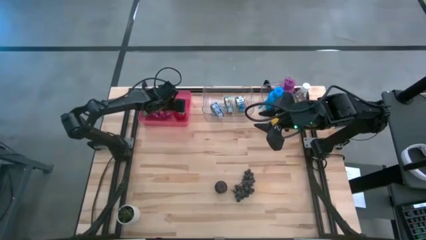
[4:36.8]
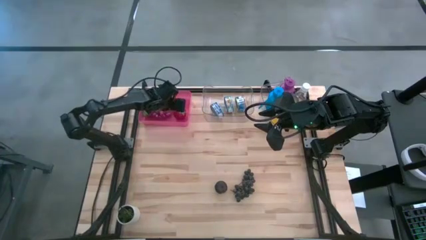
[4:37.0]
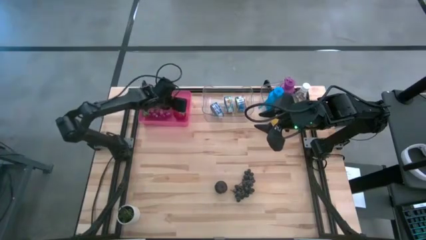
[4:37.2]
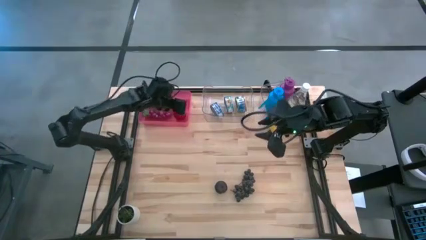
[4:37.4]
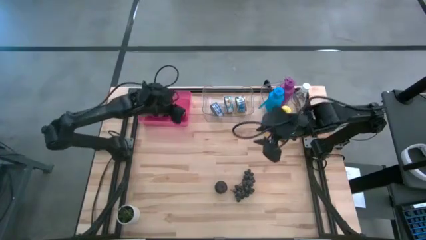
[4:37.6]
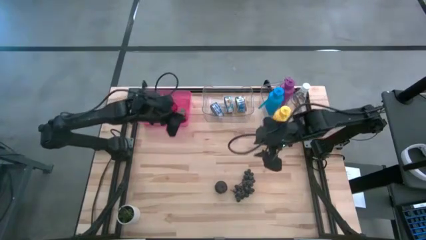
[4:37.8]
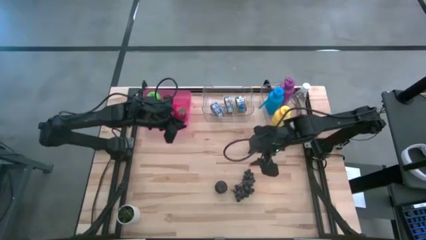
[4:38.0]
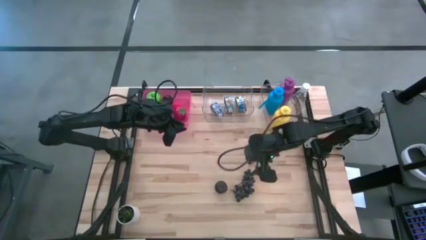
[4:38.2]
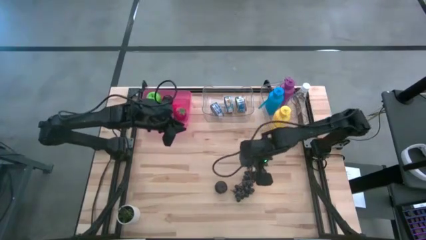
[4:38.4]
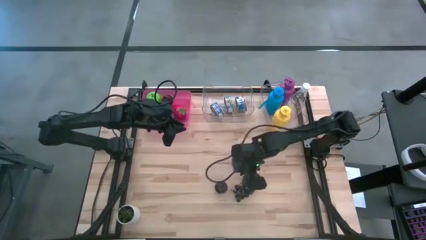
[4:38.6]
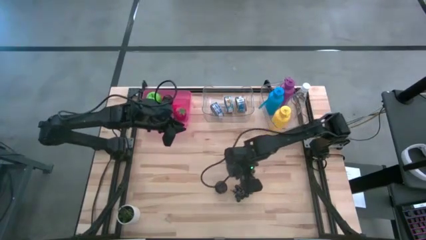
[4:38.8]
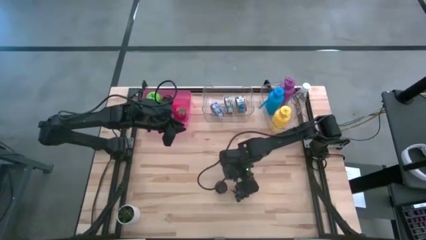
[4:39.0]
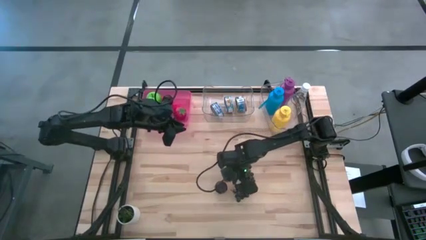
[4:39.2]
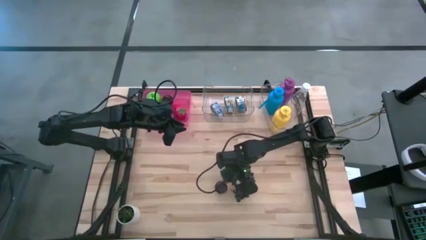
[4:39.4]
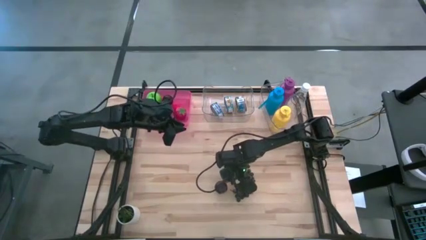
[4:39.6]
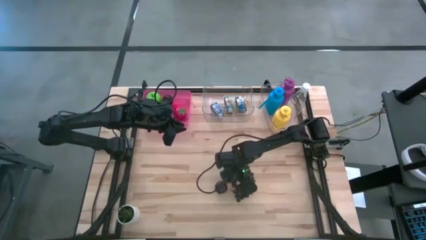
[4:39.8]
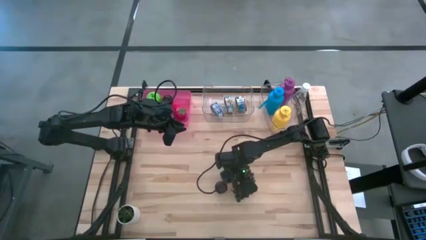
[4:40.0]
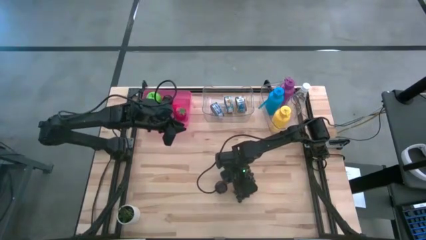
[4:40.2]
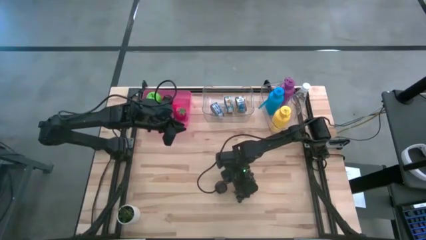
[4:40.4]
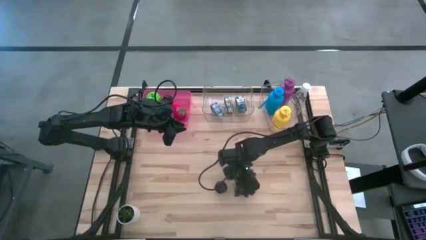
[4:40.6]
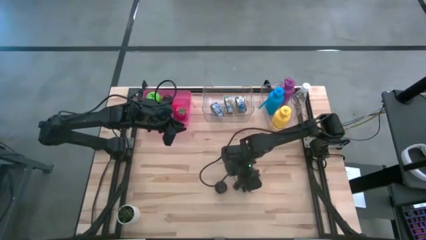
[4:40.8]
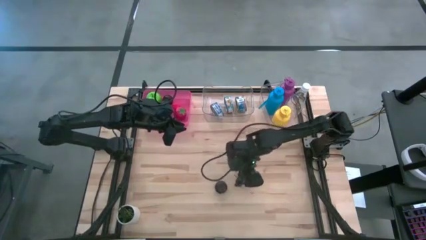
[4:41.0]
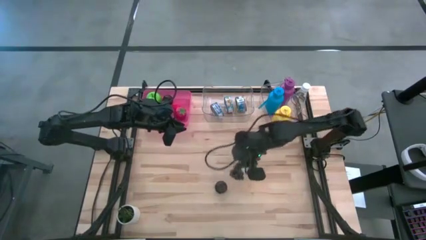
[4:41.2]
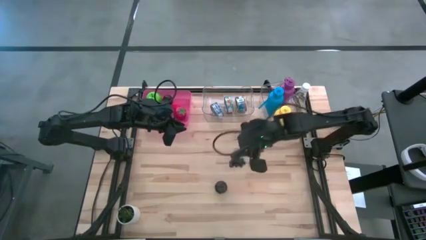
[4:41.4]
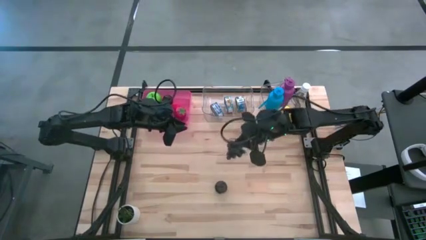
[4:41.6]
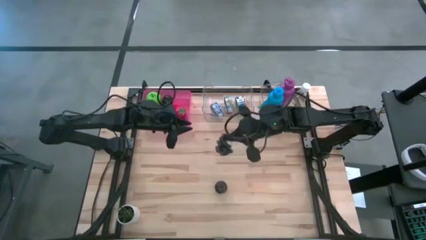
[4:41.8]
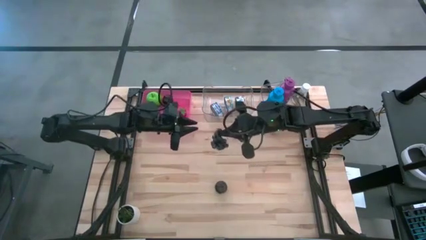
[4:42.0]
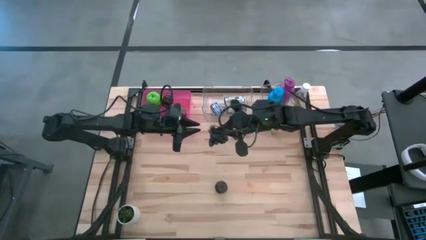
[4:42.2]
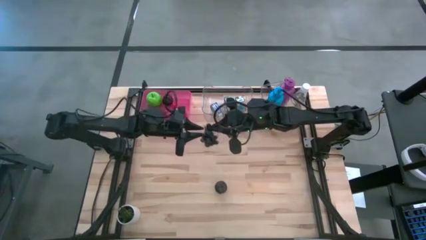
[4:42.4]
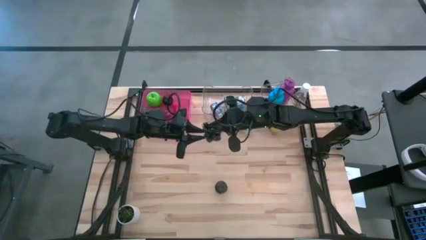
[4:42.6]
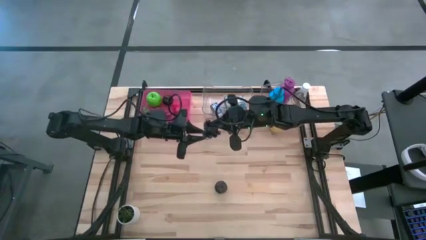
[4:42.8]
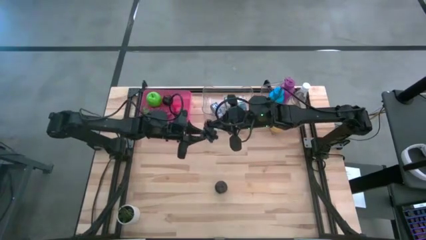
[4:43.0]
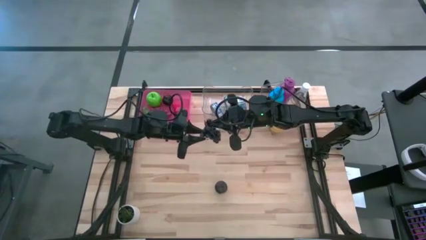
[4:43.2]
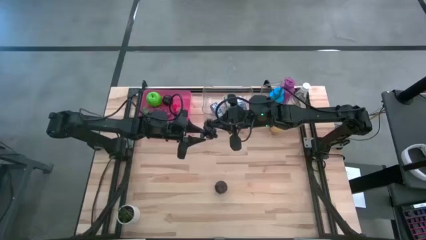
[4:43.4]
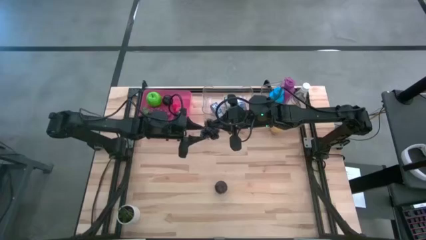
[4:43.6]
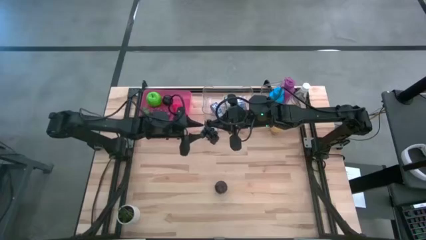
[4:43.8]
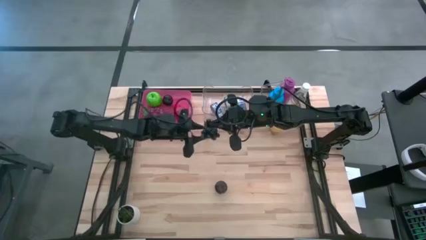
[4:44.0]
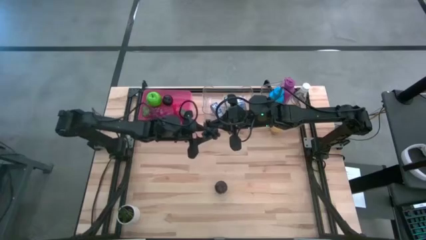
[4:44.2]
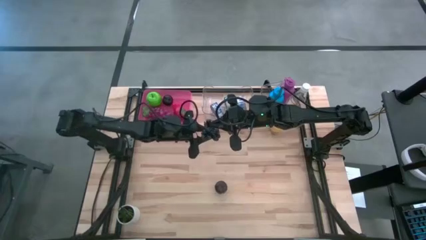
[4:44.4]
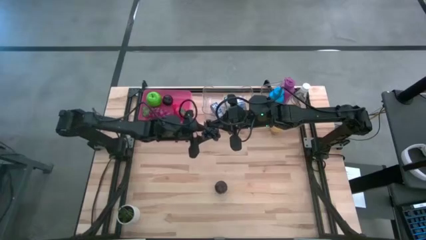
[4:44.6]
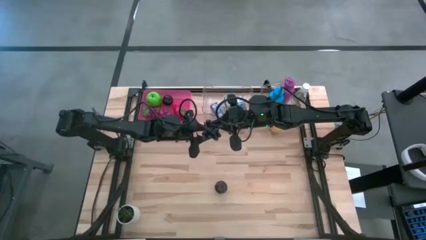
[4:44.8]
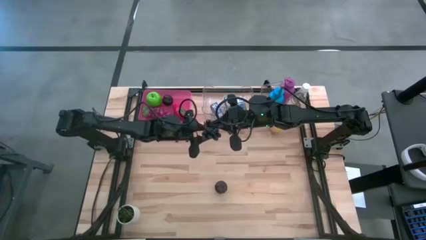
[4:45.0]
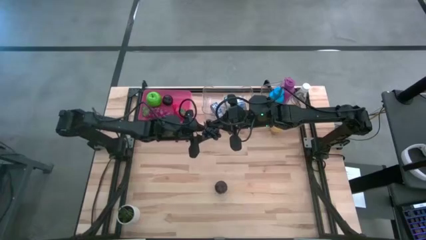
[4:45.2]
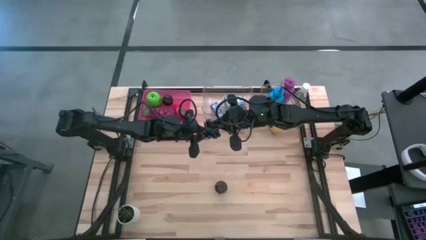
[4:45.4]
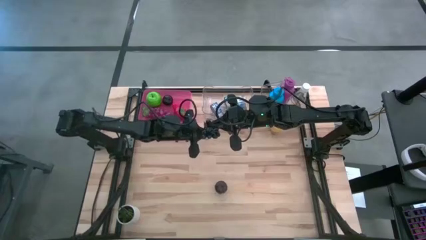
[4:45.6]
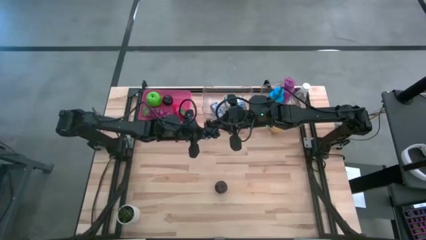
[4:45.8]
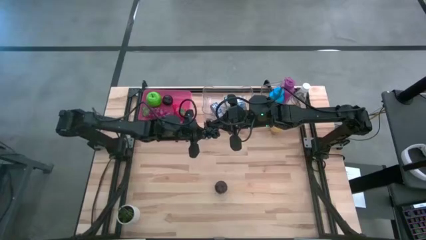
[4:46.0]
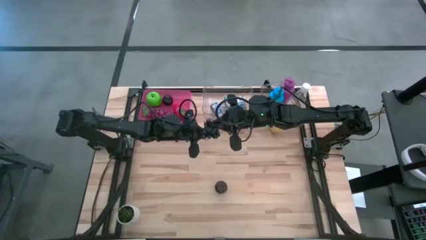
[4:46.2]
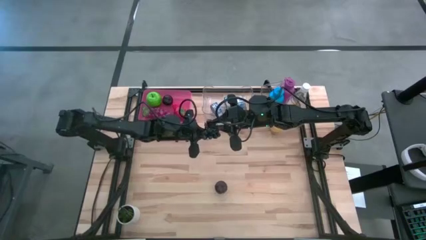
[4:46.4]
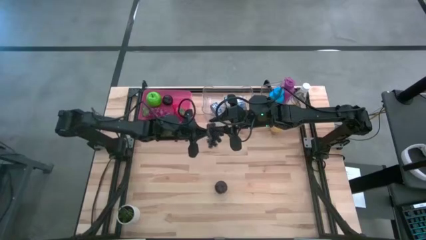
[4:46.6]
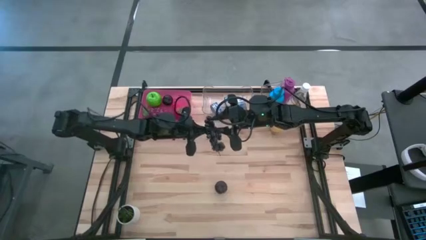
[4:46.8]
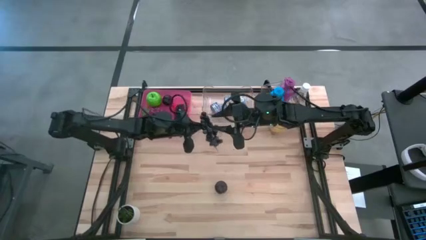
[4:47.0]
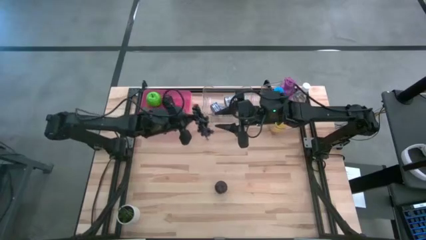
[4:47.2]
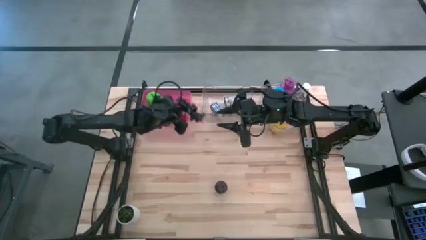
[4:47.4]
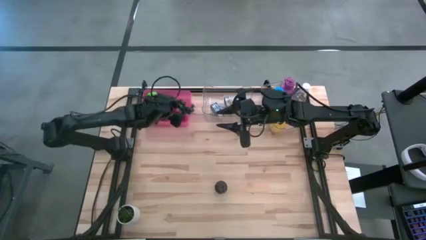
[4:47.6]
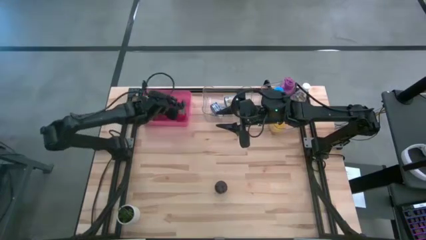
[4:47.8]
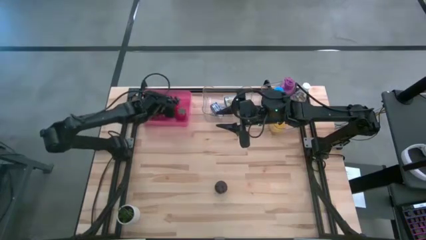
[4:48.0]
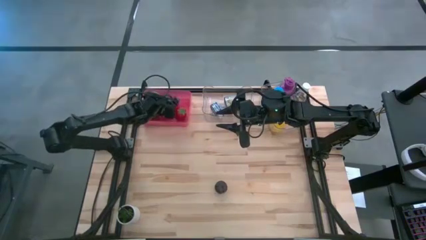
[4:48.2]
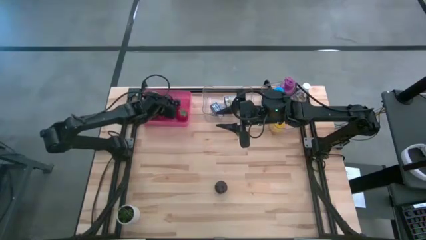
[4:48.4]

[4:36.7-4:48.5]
Task: Pick & Place Food Item
Put the black grapes into the red transparent bin
